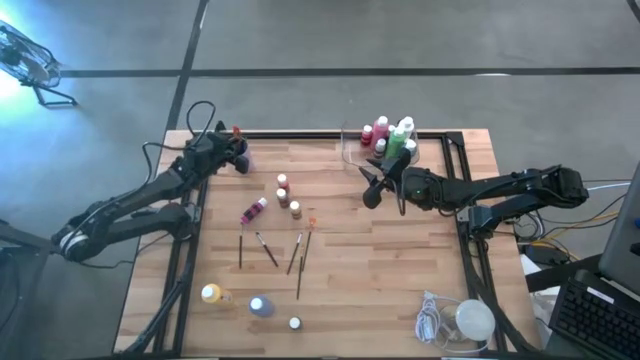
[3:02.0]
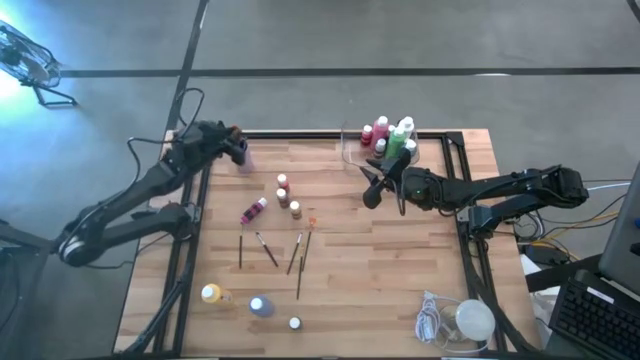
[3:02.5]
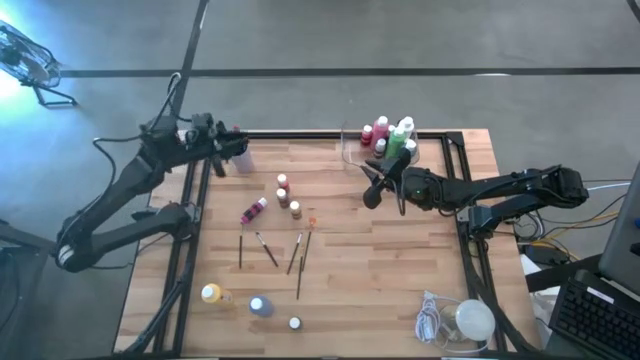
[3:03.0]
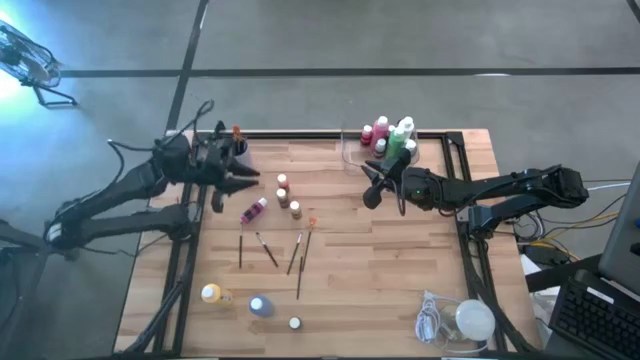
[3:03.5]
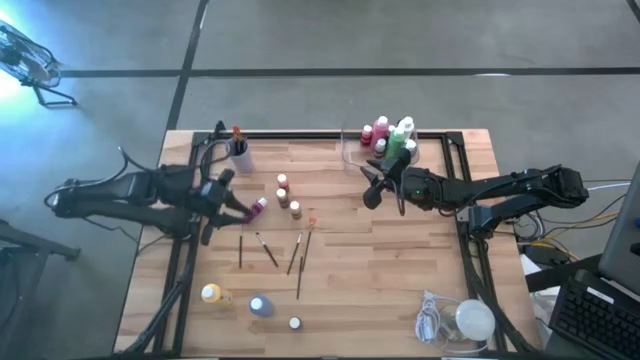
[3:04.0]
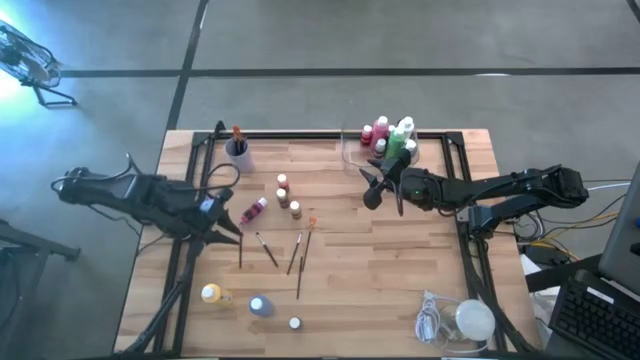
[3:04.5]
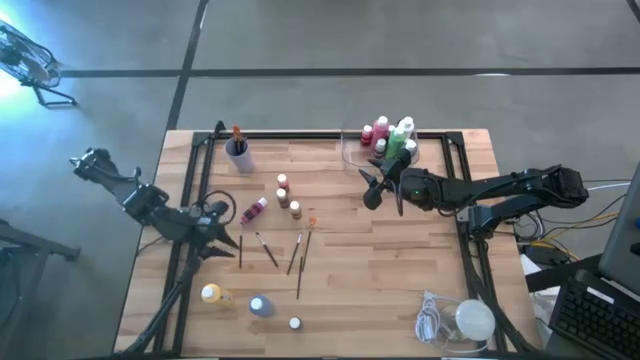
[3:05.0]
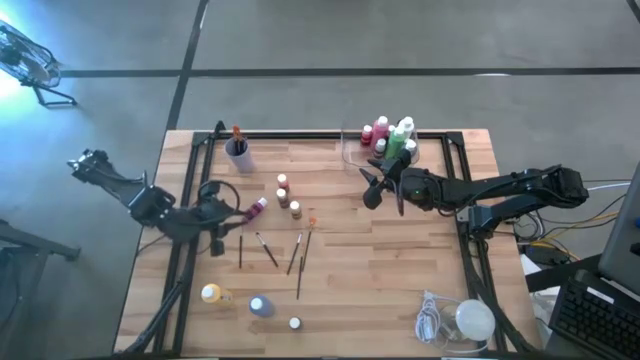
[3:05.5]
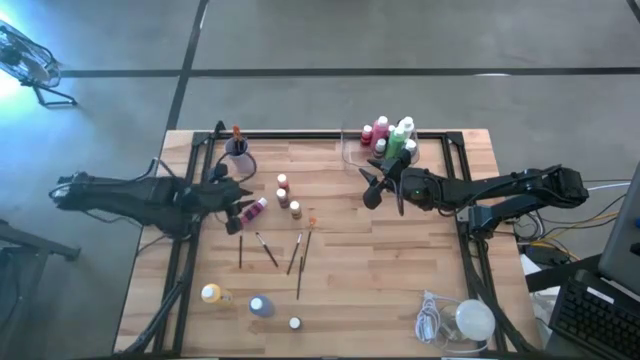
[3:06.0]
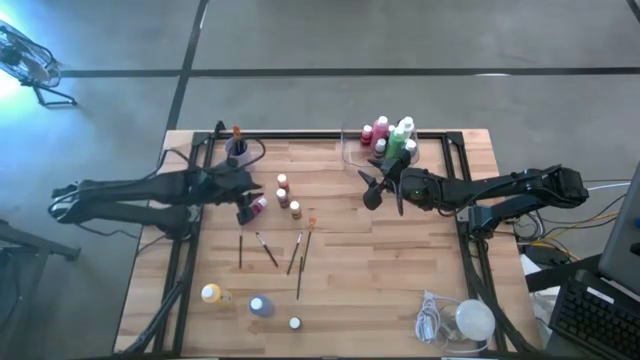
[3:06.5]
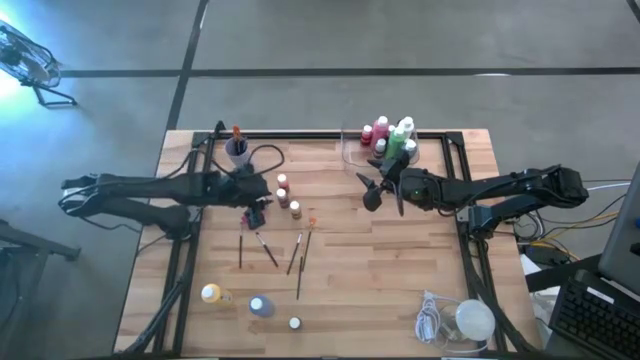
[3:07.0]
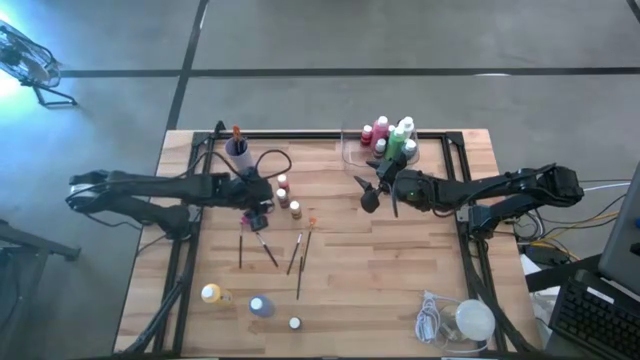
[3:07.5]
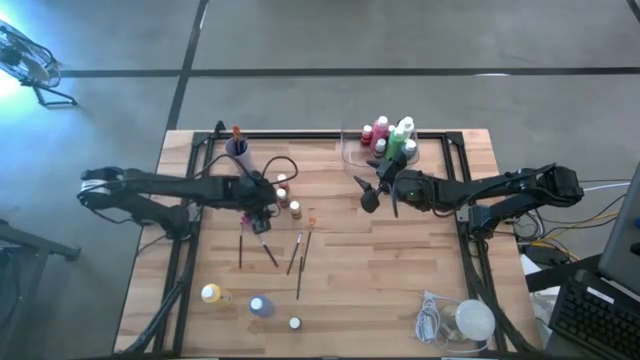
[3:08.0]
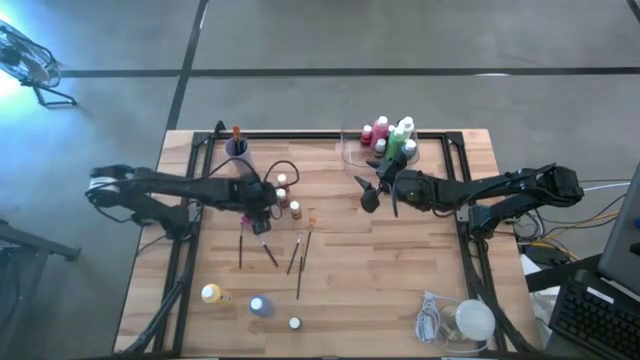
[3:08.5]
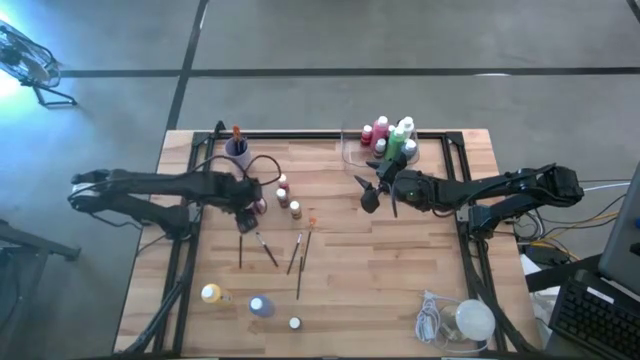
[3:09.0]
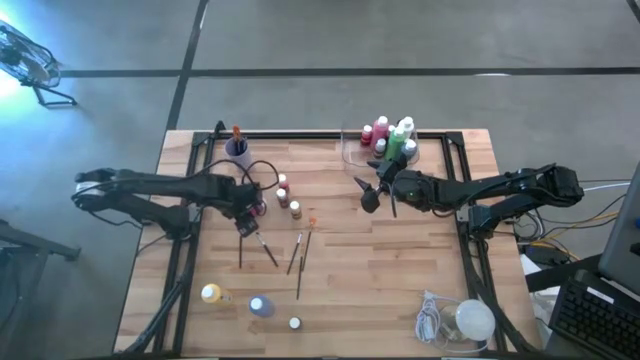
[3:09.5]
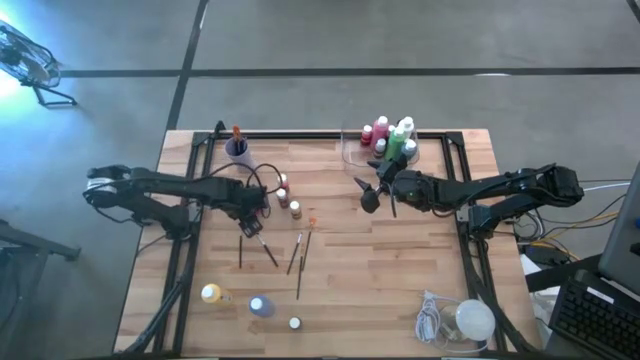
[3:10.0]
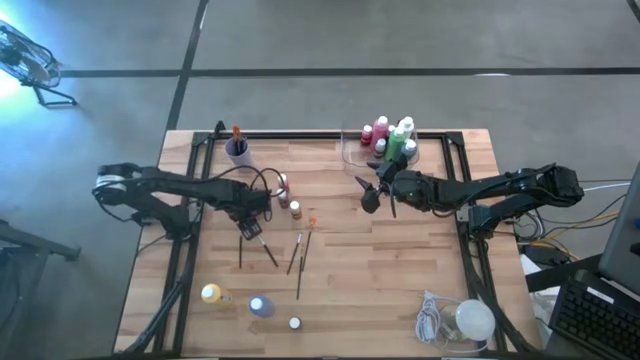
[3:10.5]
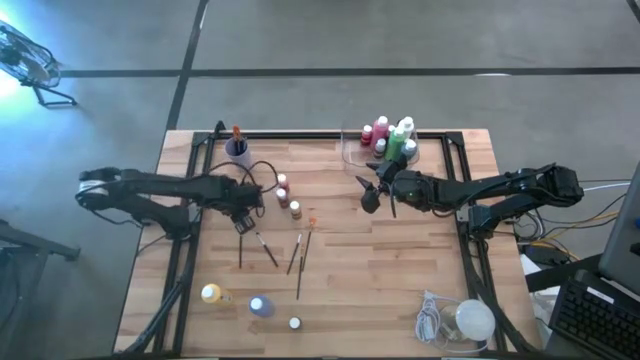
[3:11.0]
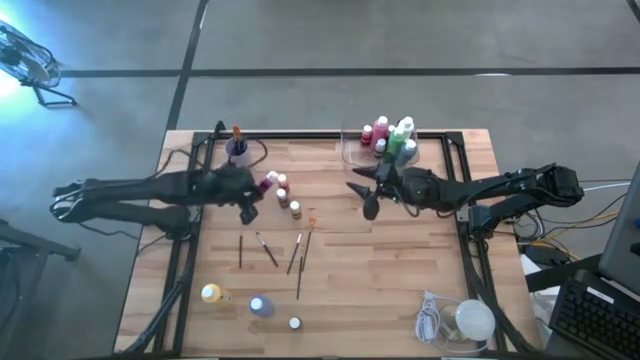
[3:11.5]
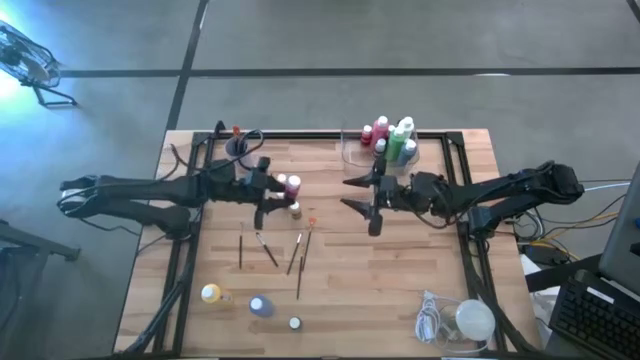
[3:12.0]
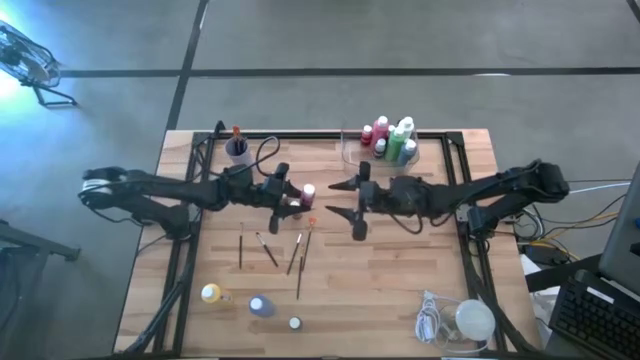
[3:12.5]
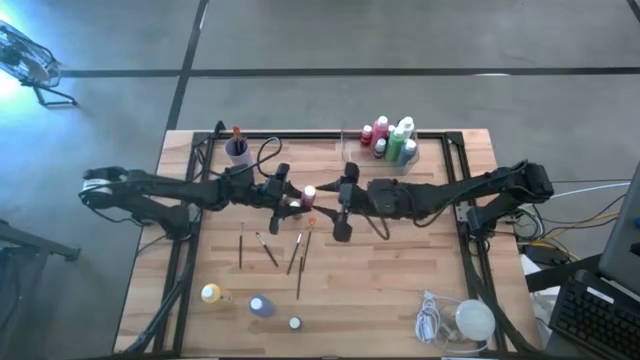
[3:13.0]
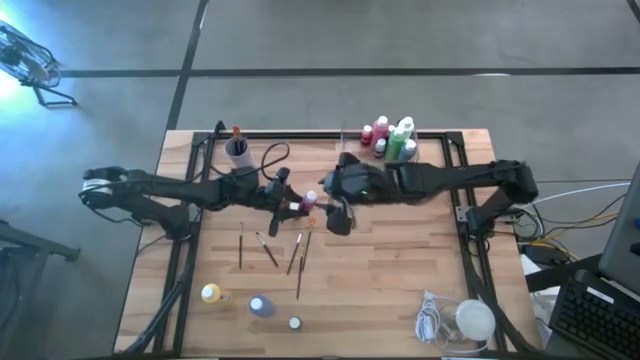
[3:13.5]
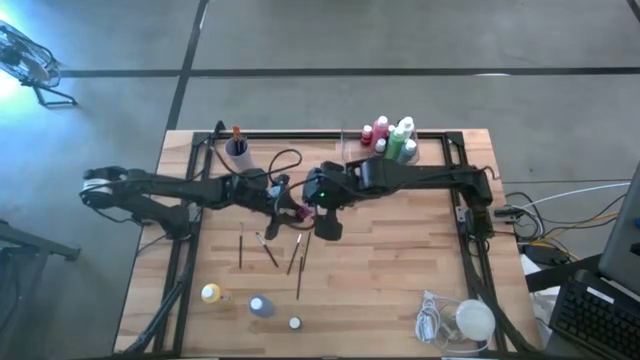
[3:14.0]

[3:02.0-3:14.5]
Task: Pick & Place Paint Supplies
Put the pink paint bottle into the transparent bin

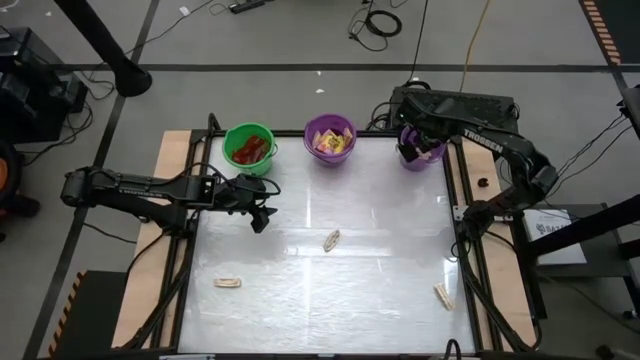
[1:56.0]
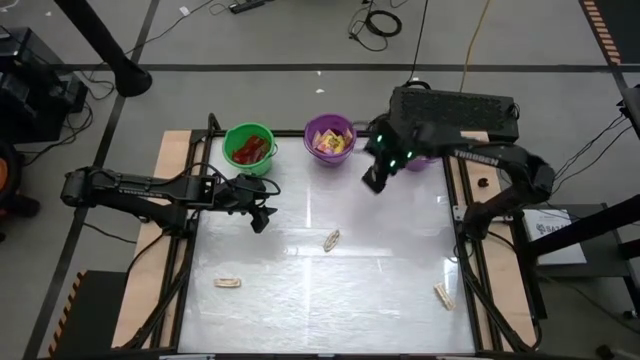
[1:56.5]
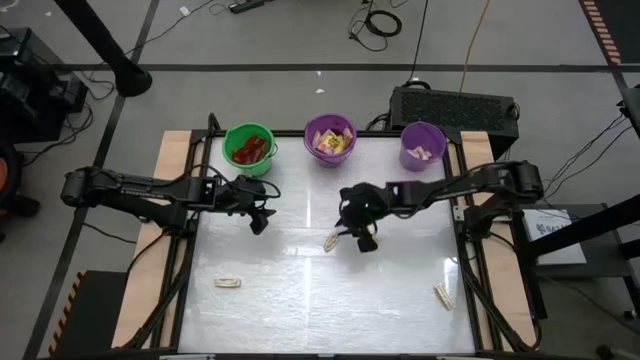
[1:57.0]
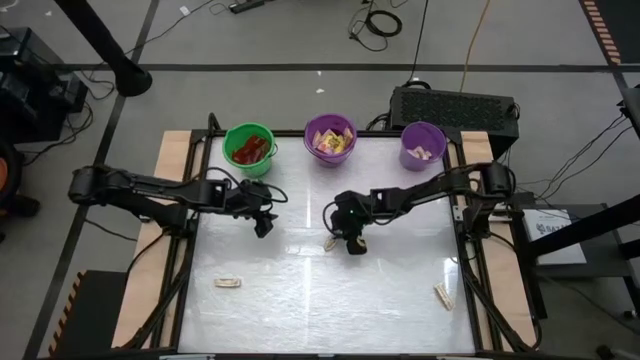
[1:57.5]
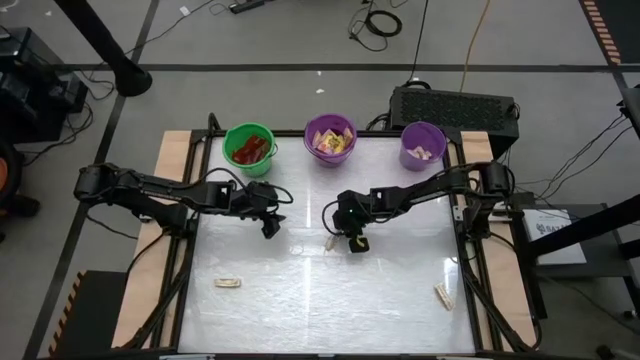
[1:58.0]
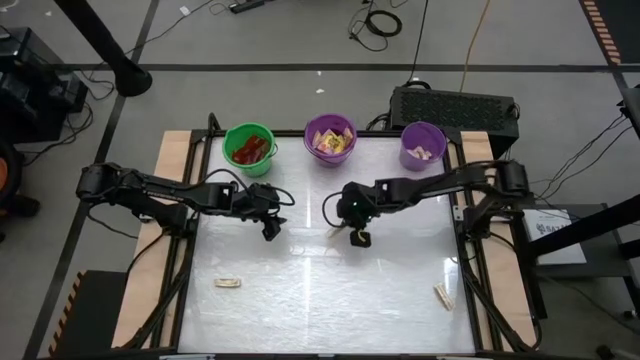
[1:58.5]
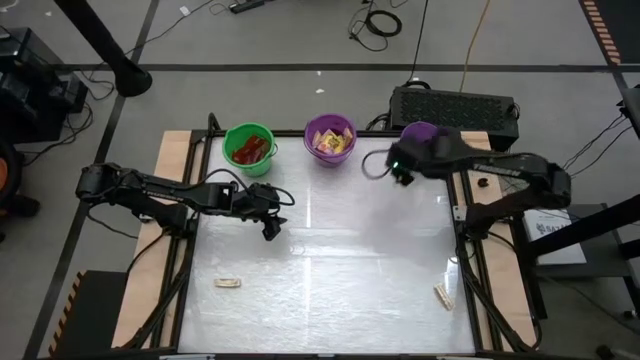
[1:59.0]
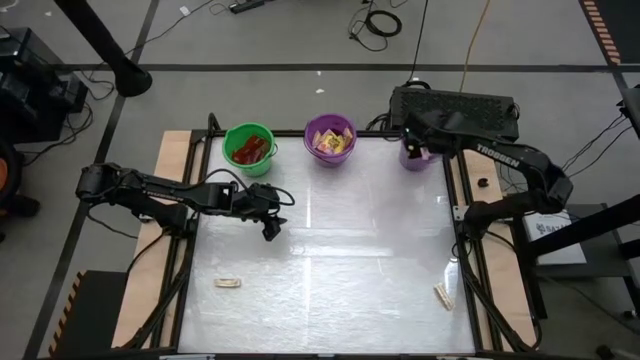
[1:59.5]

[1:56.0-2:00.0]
Task: Sort candy by brand, put in halloween buckets
Put the white candy pack in the right purple bucket

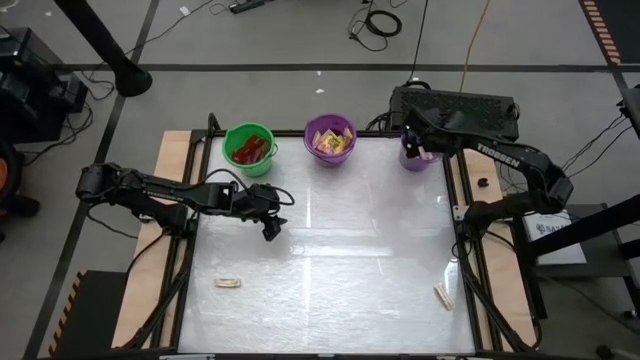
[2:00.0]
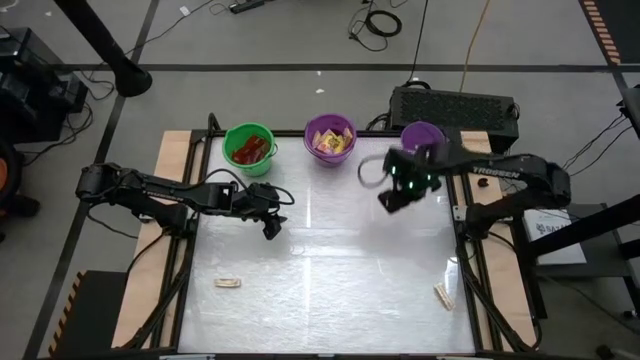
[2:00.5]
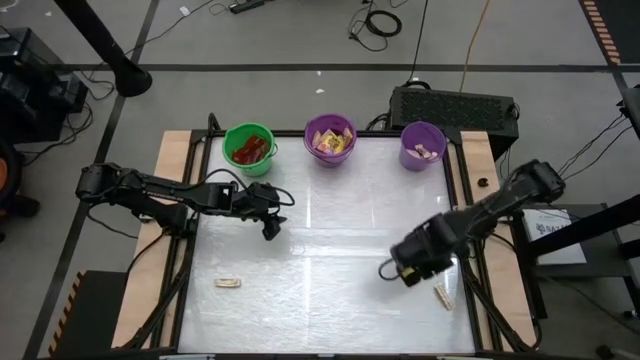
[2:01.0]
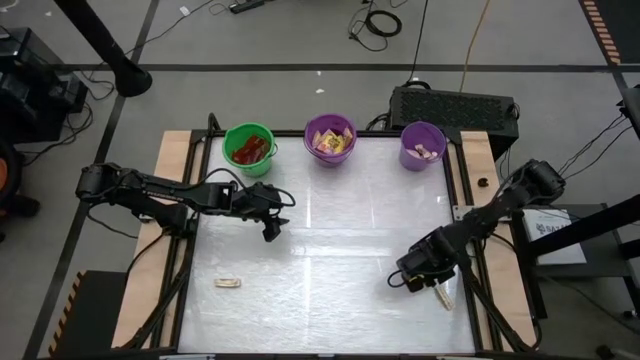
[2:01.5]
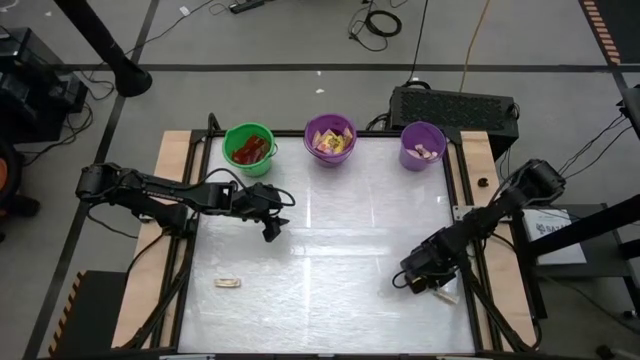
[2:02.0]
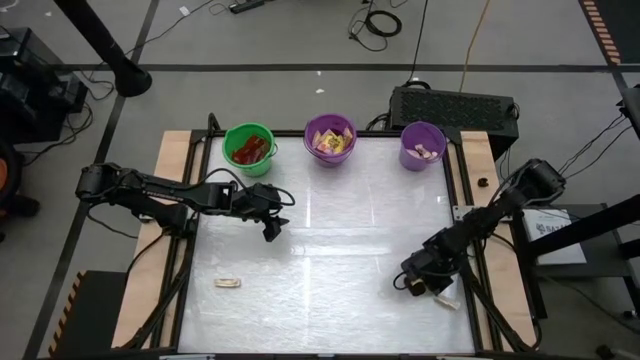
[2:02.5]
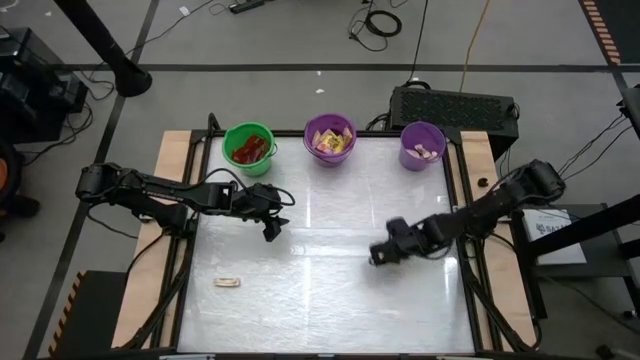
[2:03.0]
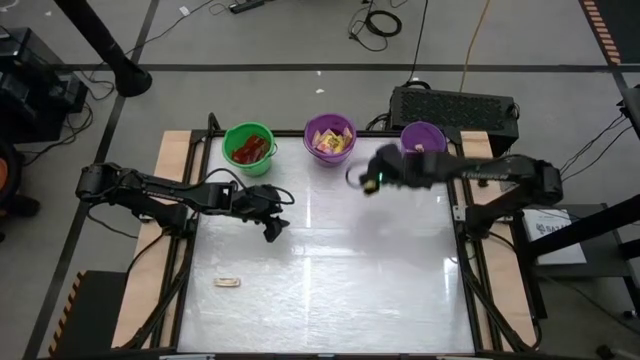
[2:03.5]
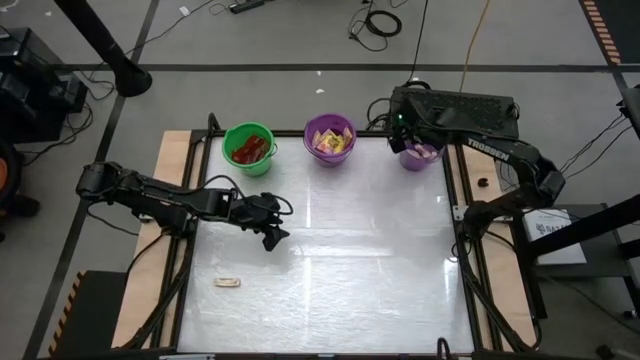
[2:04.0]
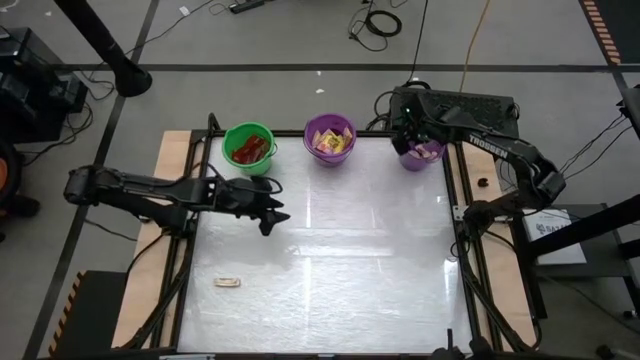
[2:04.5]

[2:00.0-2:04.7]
Put the white candy pack in the right purple bucket
